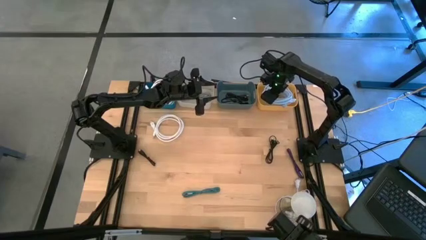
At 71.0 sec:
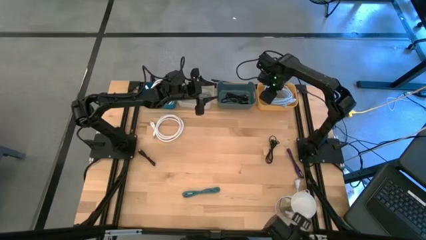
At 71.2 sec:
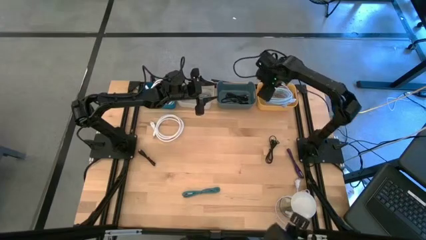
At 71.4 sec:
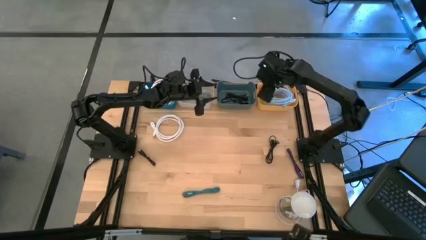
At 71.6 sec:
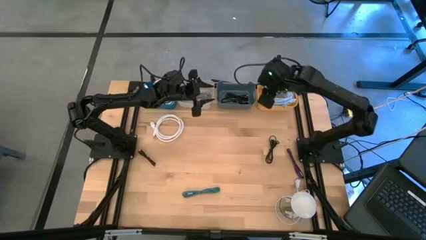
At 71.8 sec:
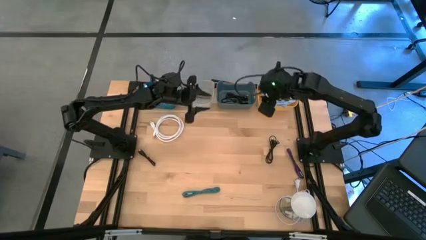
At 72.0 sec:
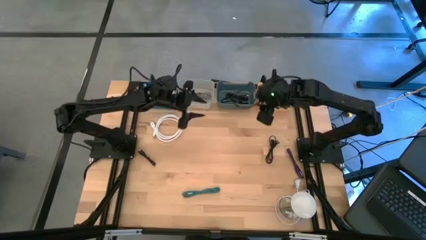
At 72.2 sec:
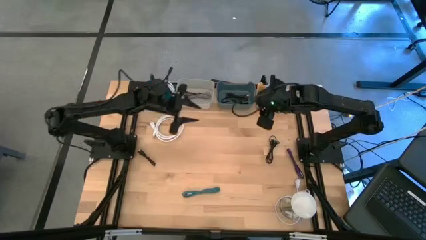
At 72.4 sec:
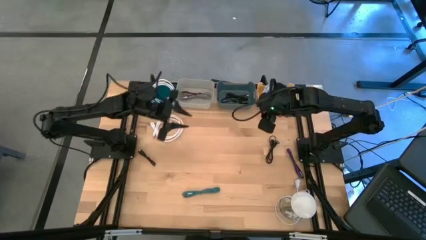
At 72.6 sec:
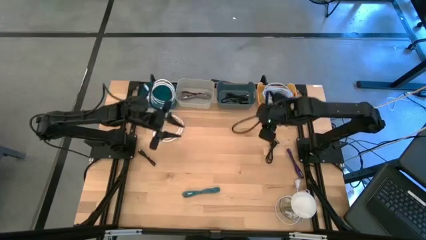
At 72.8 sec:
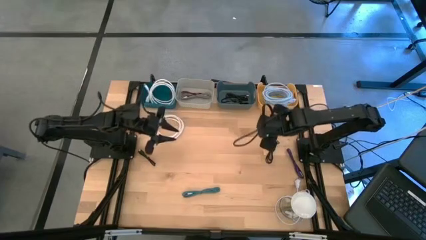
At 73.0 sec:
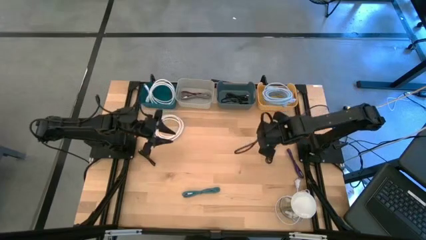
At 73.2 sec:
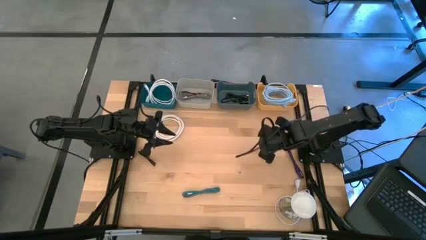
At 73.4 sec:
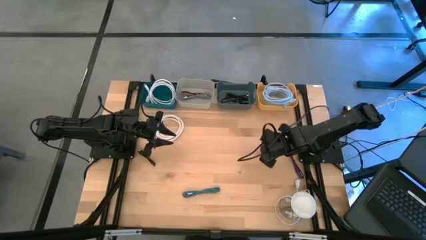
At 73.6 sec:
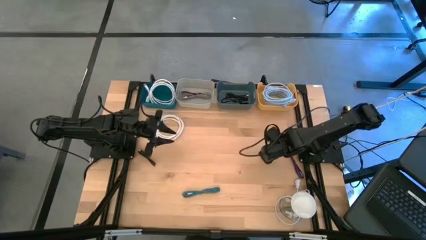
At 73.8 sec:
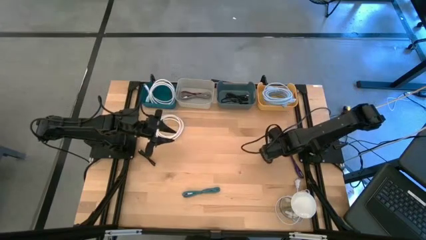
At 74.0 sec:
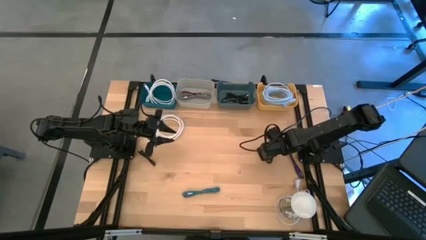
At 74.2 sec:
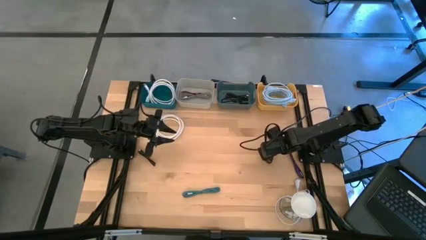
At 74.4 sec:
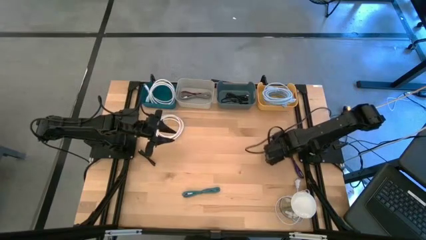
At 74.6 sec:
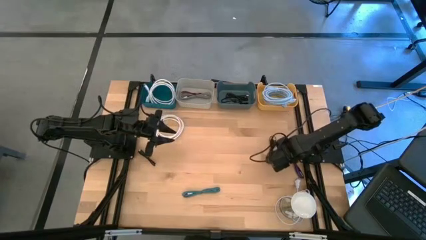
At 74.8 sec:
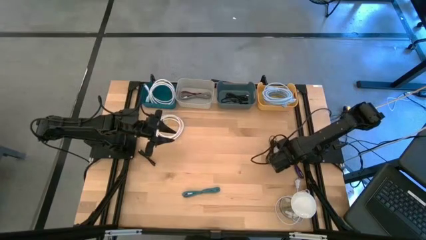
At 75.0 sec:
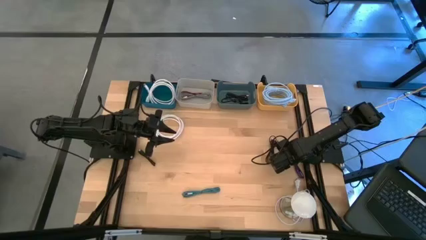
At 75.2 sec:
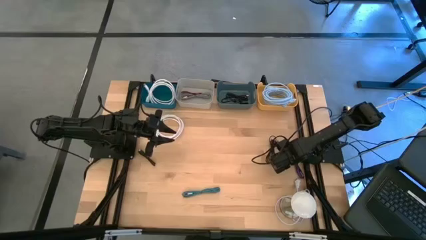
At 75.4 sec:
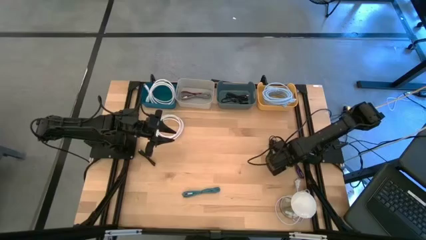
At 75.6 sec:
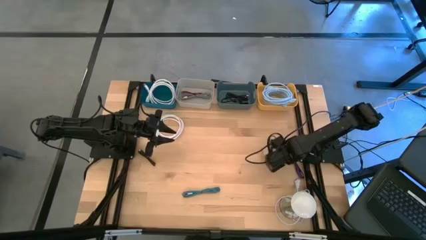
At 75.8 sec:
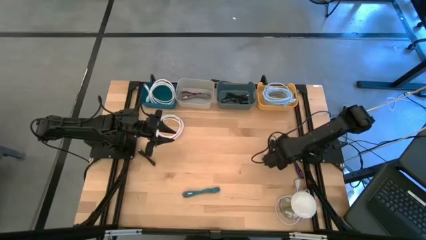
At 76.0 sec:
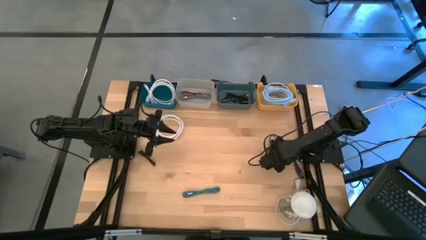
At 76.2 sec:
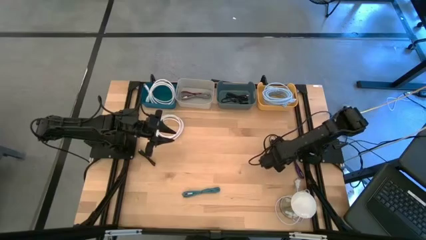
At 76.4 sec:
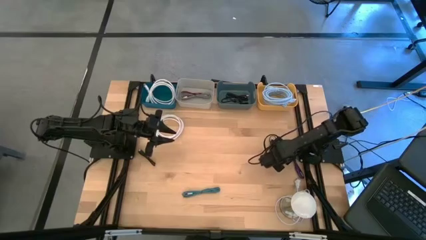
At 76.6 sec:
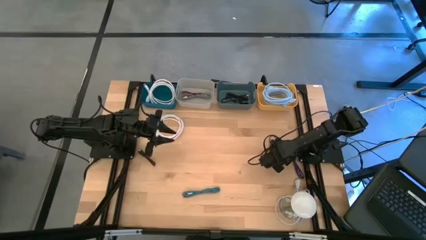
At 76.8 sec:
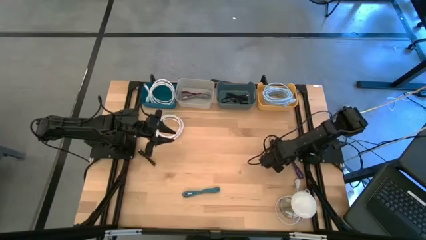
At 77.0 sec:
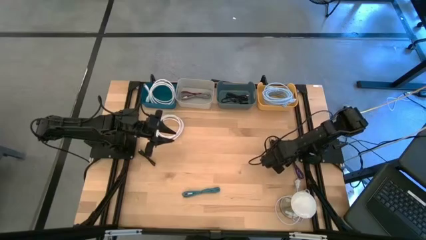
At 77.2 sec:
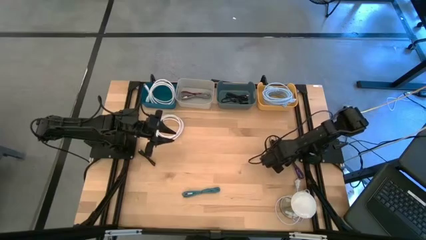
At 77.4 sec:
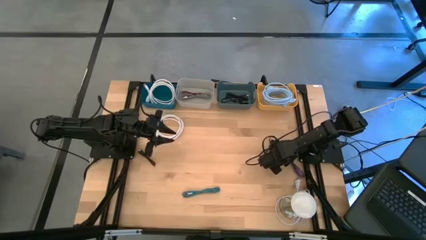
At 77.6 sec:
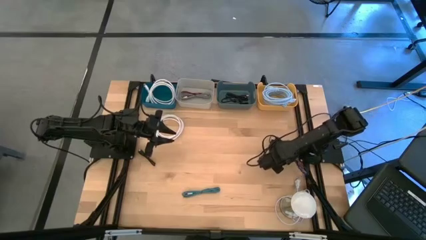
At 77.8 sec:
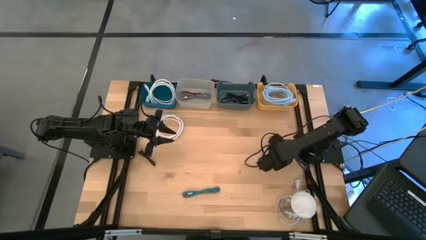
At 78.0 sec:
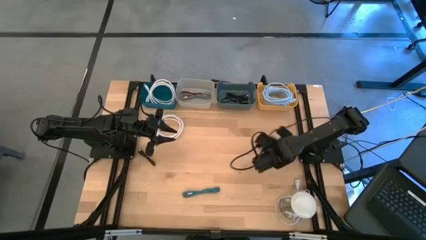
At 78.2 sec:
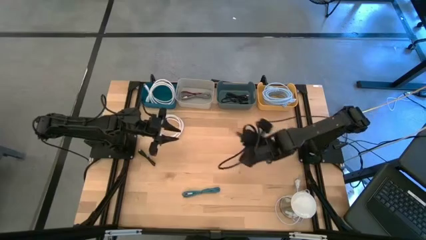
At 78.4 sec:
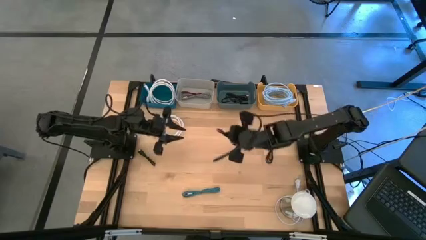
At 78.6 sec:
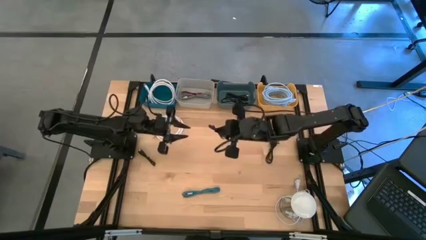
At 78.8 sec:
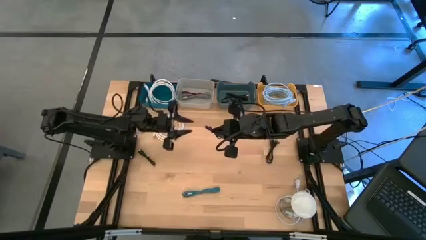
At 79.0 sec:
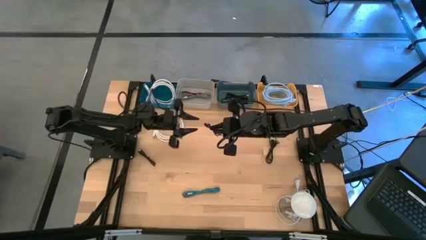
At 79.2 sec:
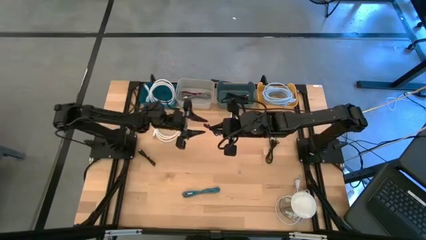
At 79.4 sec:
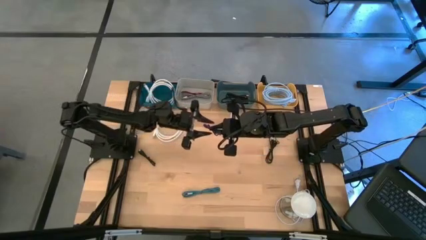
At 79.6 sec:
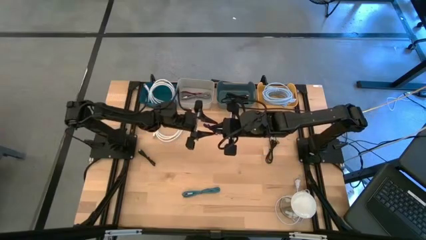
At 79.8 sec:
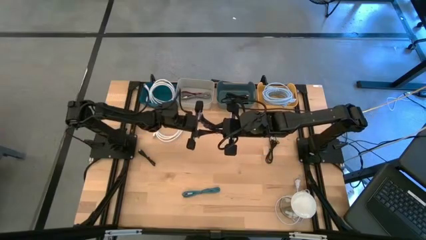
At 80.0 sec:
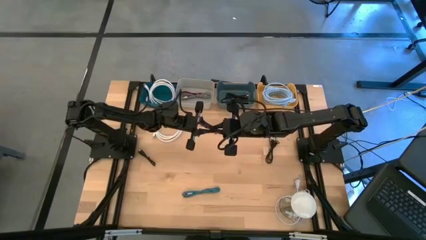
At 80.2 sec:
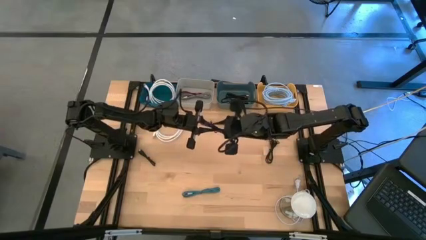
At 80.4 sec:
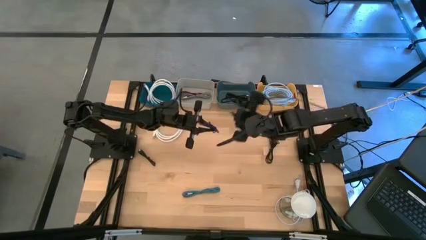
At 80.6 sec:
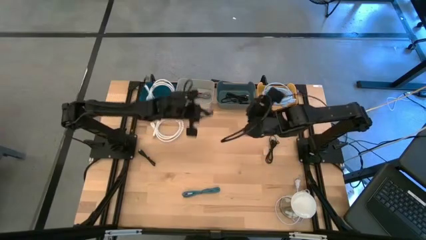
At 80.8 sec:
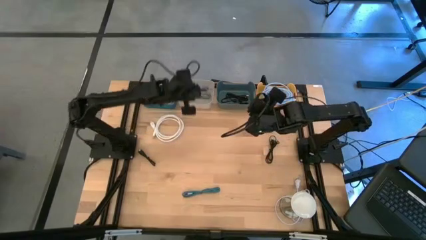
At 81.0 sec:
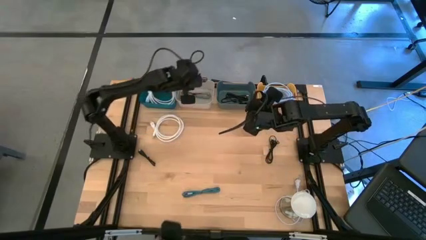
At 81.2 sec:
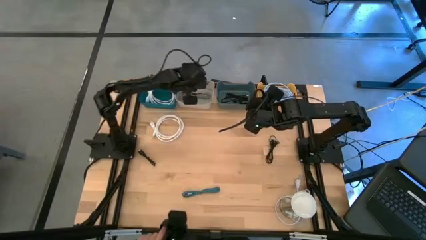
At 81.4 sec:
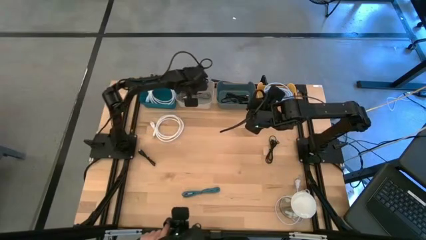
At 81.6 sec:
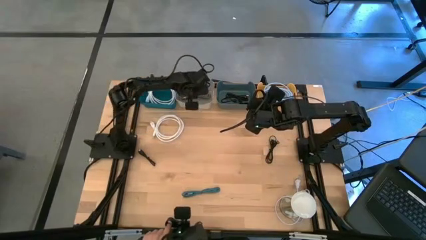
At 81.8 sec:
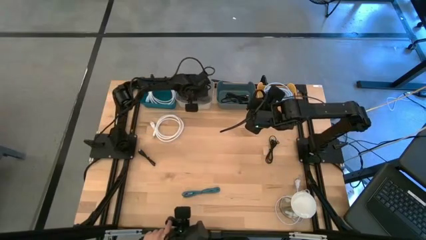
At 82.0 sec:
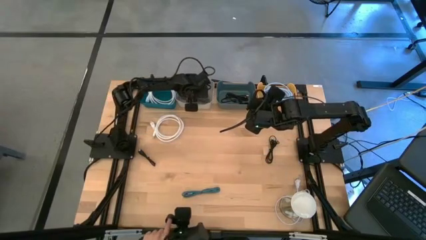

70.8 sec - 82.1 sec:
Task: Pick & Place USB Port
Put the black and violet USB cable into the gray bin

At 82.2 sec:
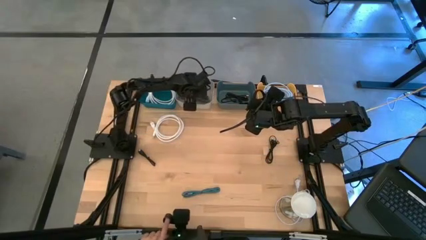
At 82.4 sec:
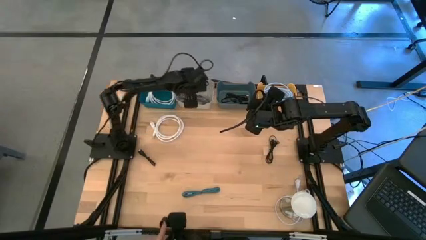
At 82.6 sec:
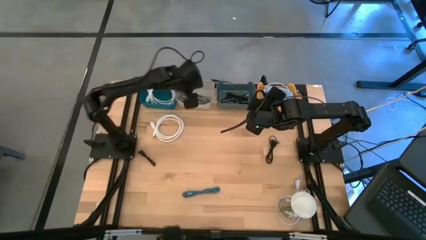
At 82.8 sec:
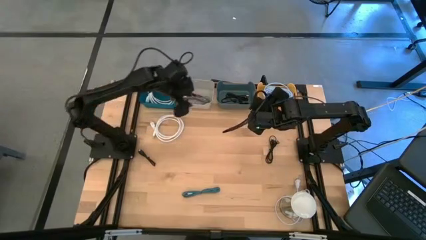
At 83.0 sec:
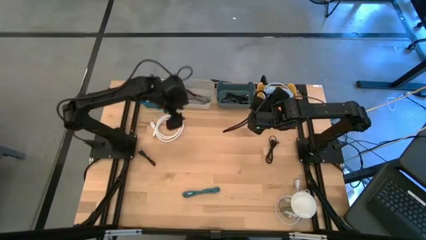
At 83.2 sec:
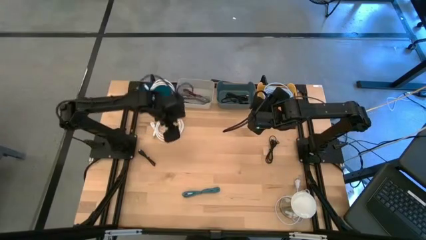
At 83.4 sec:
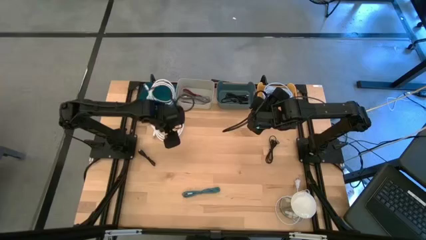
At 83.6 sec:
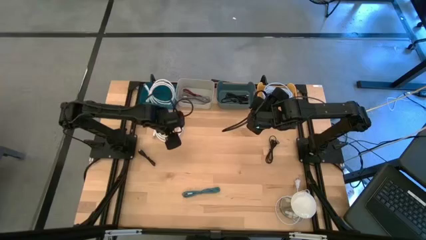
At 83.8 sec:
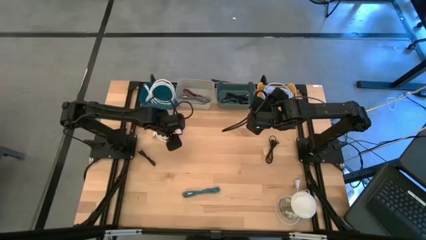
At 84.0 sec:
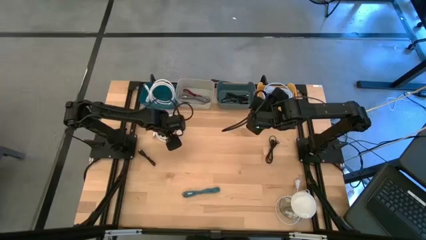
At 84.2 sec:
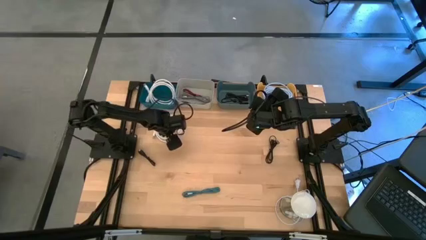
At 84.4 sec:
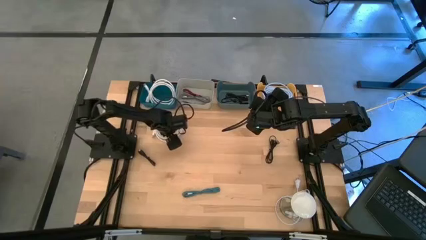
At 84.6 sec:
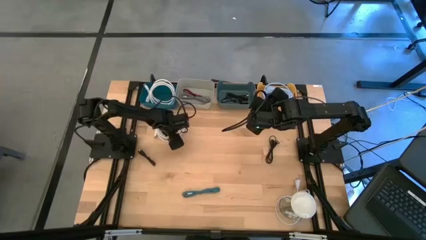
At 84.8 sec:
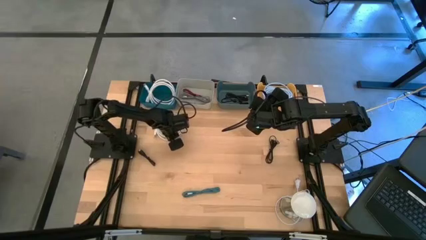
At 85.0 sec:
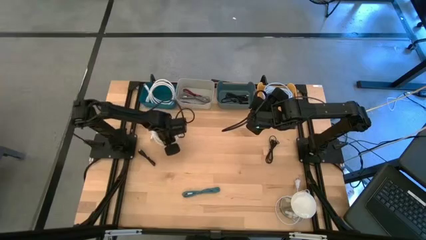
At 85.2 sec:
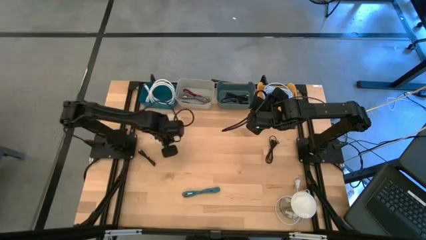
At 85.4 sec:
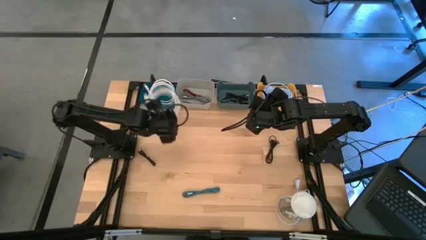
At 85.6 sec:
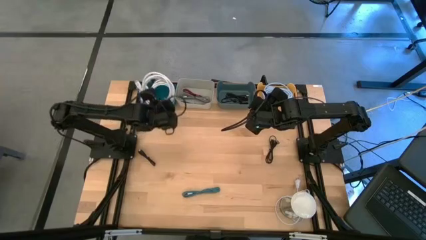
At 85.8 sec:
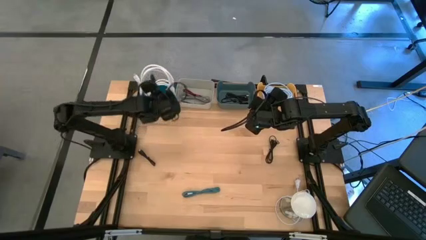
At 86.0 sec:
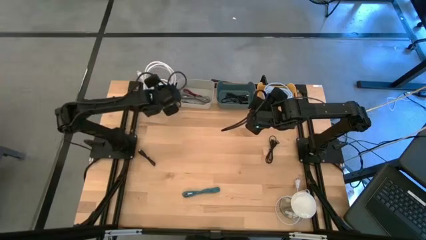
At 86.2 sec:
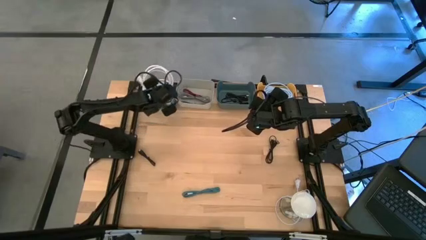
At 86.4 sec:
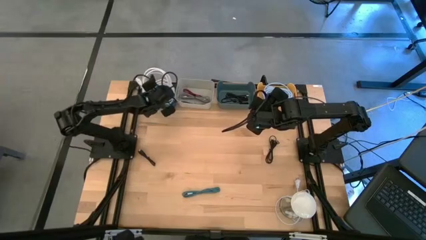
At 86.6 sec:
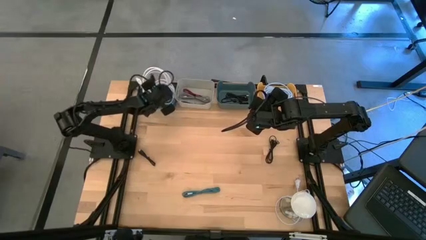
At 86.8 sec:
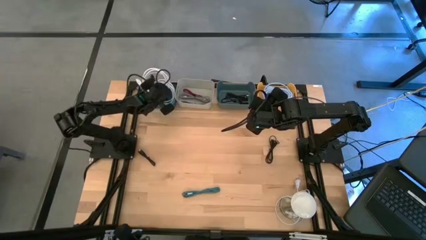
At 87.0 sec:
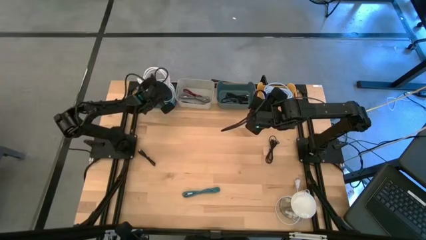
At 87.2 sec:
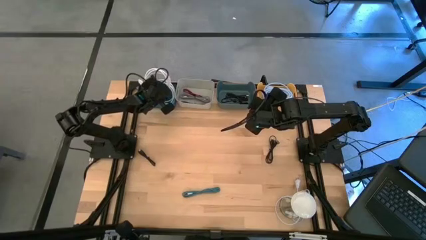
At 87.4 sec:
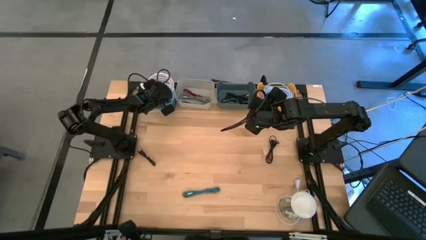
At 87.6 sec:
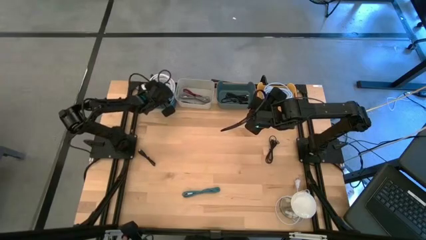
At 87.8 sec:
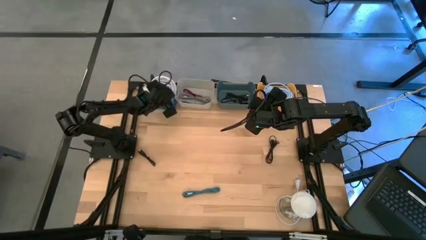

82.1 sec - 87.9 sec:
Put the white HDMI cable into the blue bin
